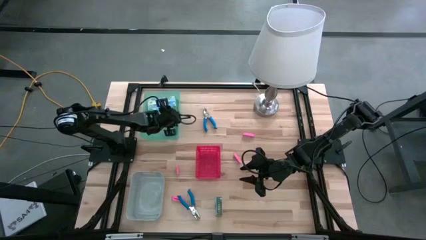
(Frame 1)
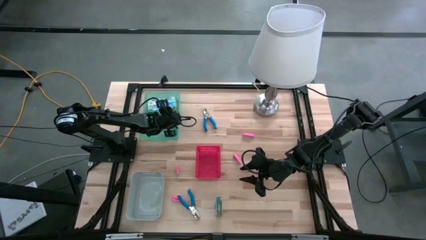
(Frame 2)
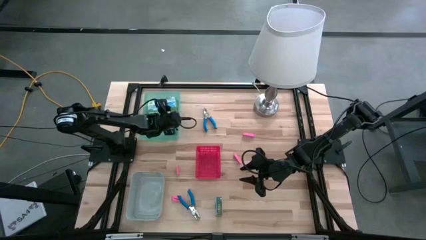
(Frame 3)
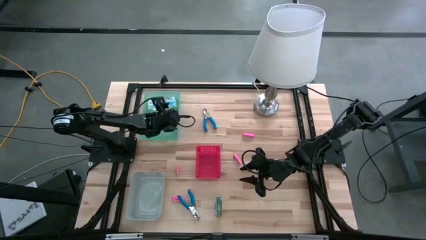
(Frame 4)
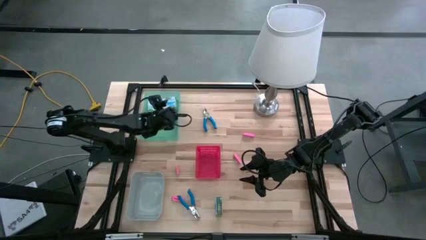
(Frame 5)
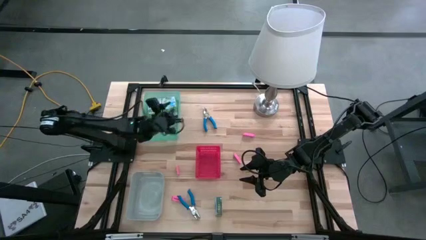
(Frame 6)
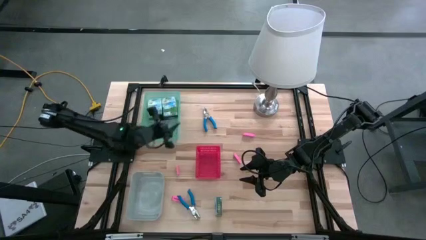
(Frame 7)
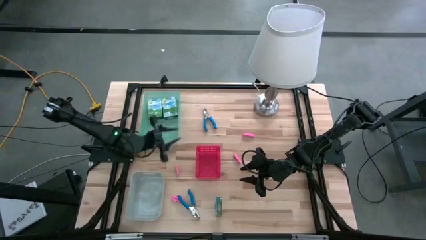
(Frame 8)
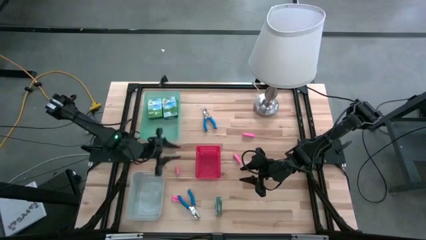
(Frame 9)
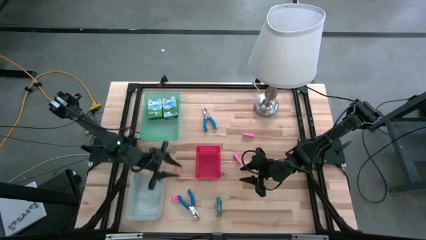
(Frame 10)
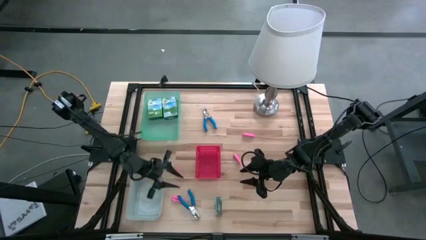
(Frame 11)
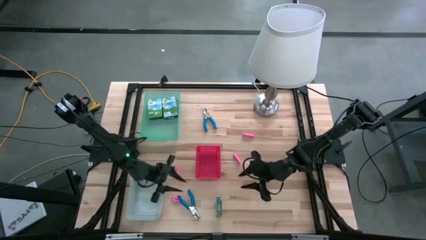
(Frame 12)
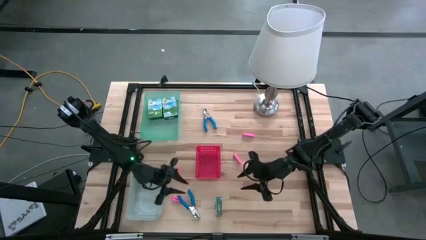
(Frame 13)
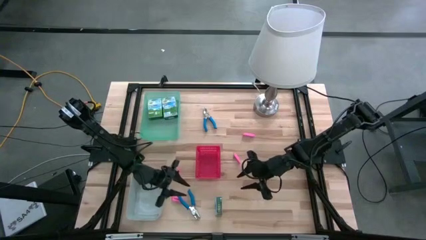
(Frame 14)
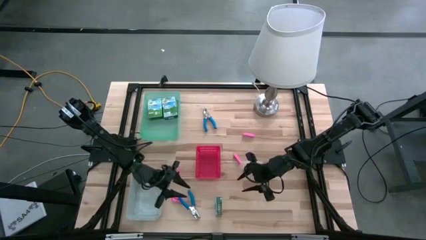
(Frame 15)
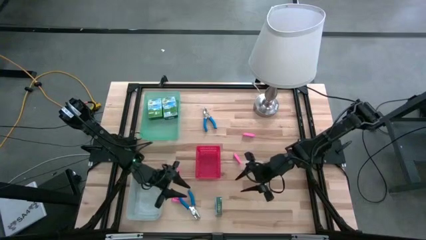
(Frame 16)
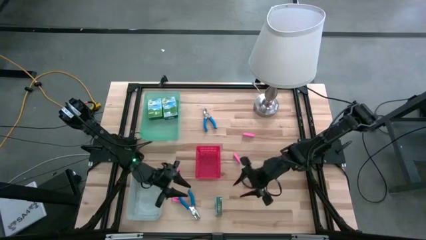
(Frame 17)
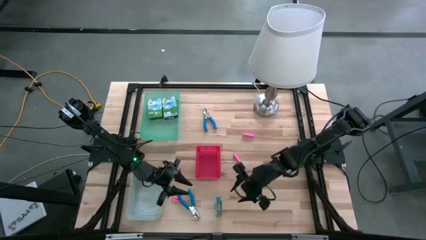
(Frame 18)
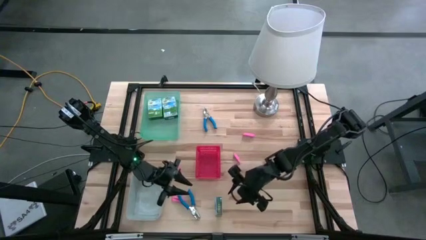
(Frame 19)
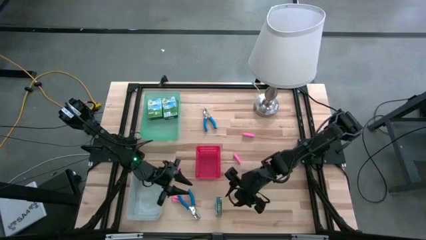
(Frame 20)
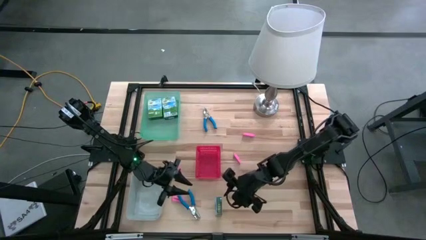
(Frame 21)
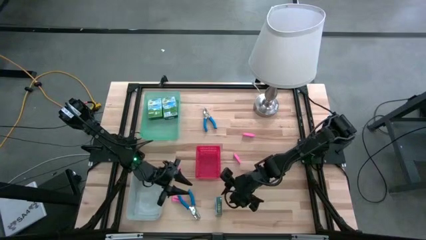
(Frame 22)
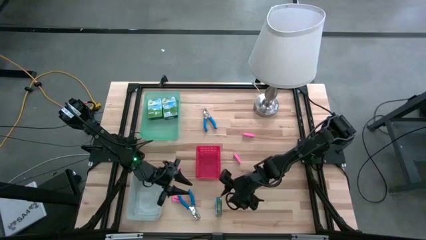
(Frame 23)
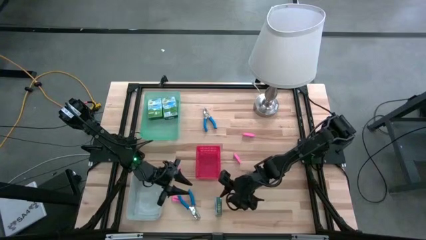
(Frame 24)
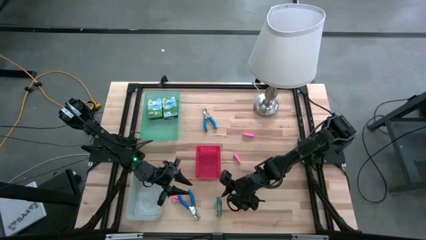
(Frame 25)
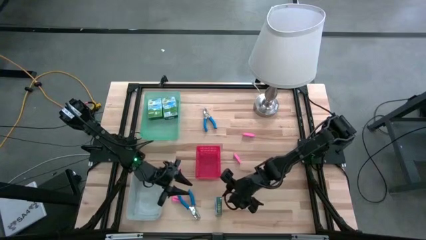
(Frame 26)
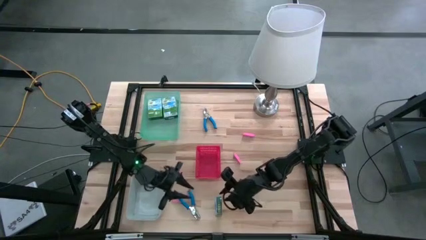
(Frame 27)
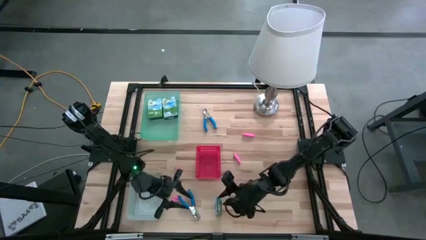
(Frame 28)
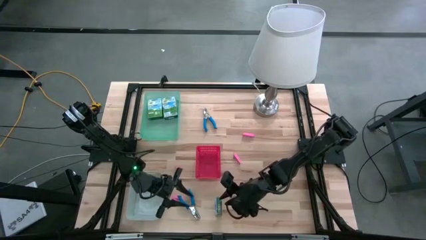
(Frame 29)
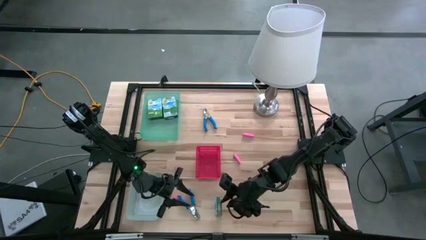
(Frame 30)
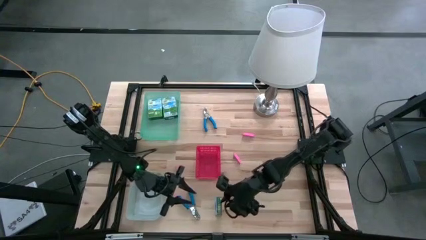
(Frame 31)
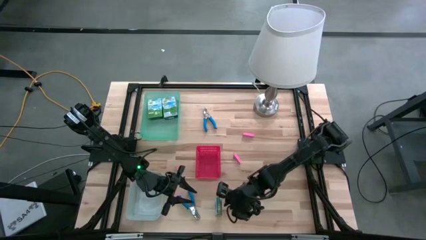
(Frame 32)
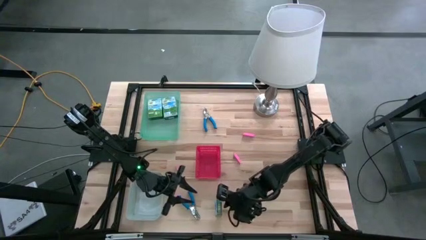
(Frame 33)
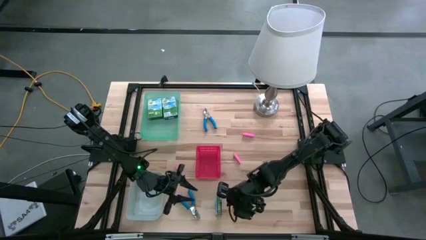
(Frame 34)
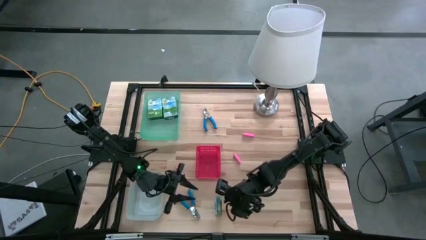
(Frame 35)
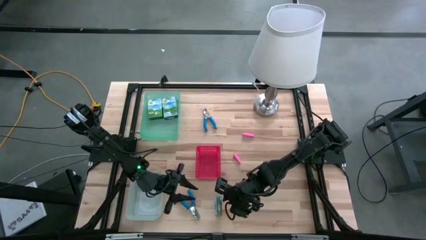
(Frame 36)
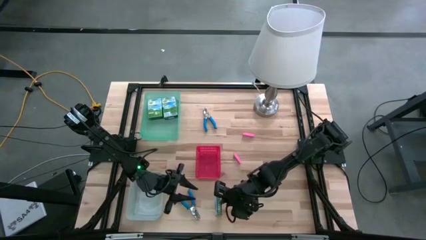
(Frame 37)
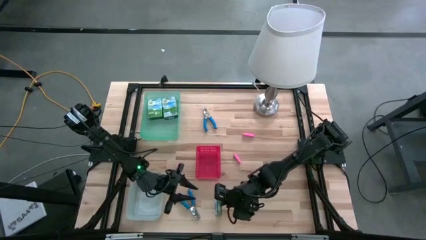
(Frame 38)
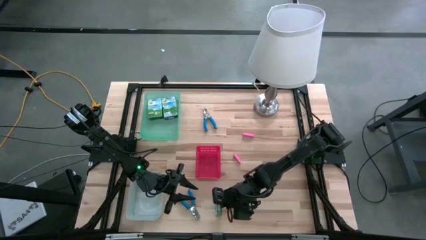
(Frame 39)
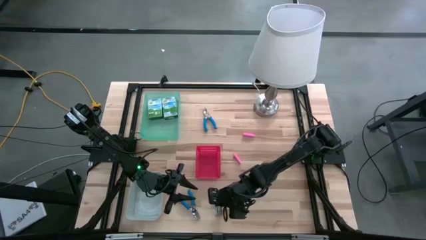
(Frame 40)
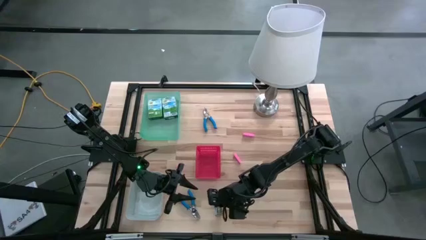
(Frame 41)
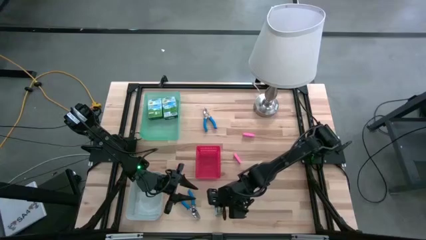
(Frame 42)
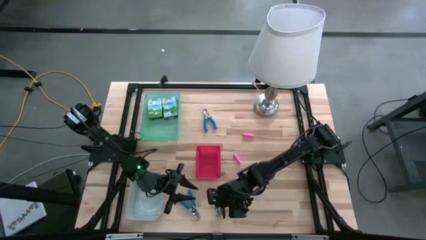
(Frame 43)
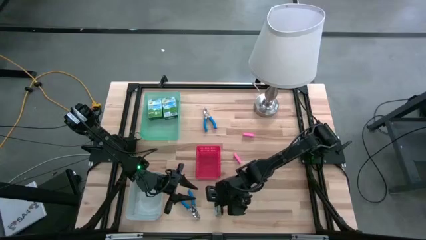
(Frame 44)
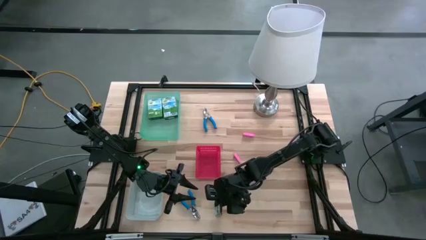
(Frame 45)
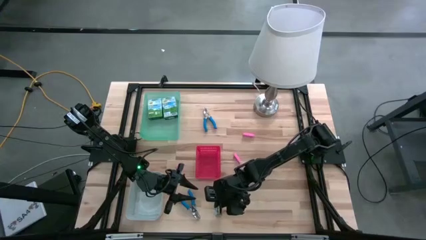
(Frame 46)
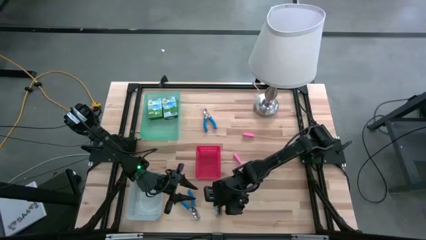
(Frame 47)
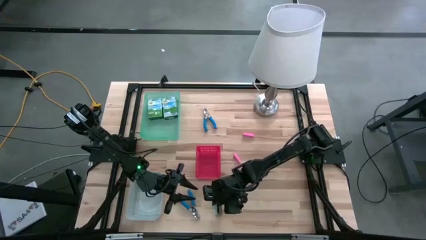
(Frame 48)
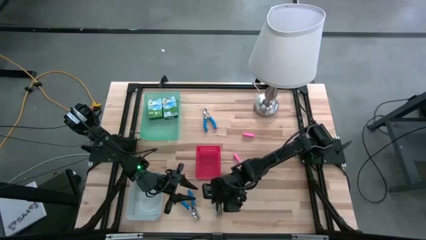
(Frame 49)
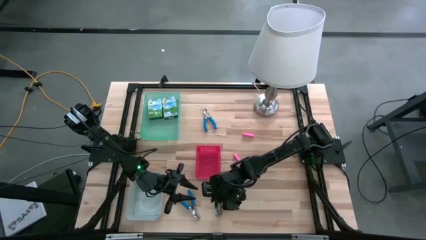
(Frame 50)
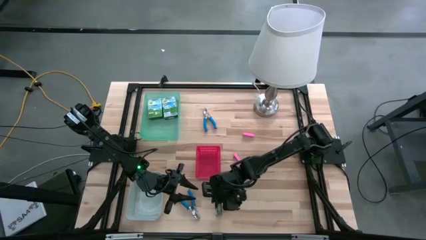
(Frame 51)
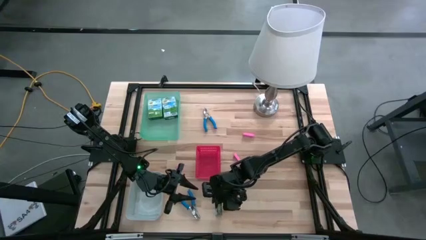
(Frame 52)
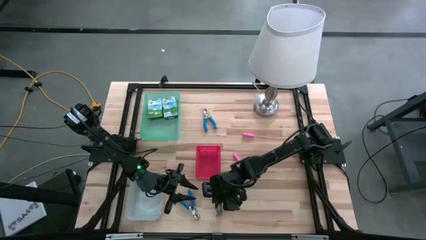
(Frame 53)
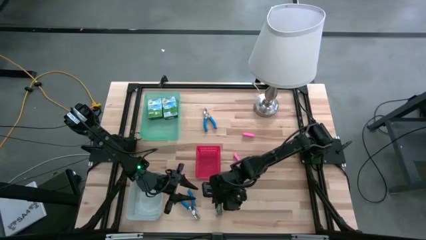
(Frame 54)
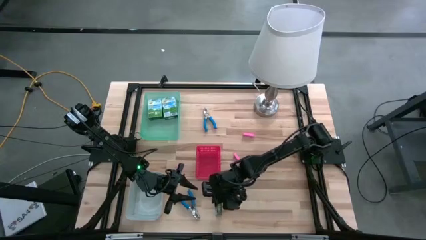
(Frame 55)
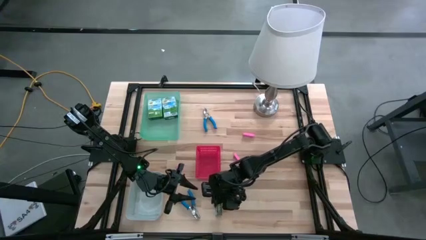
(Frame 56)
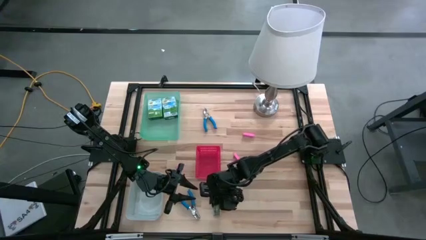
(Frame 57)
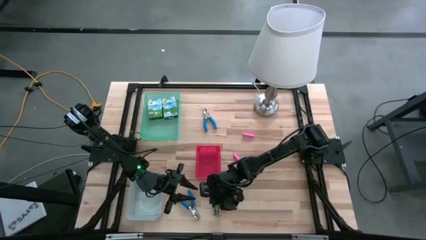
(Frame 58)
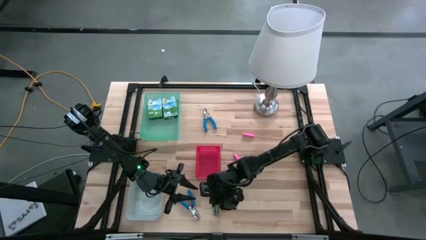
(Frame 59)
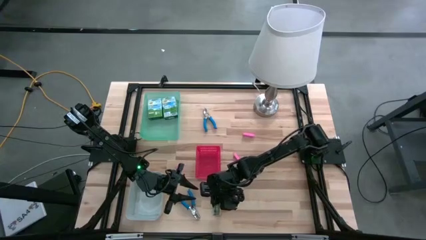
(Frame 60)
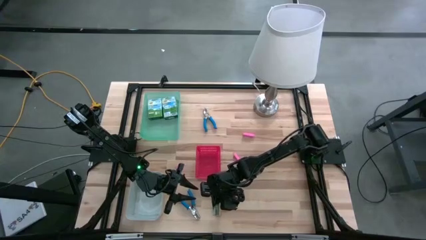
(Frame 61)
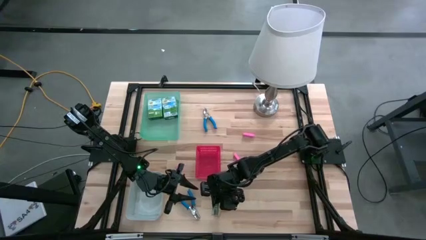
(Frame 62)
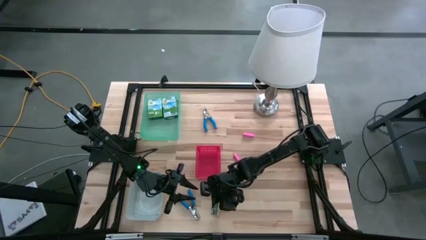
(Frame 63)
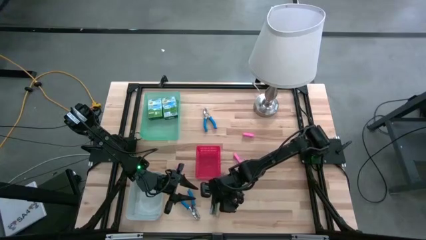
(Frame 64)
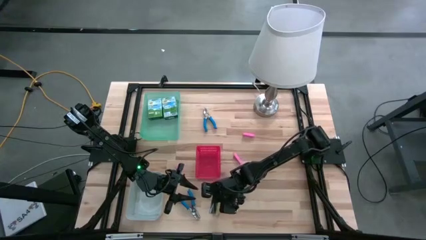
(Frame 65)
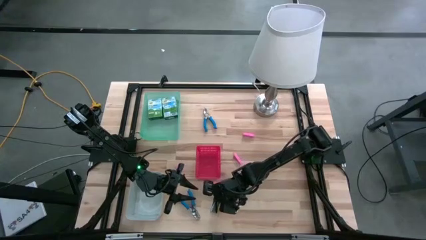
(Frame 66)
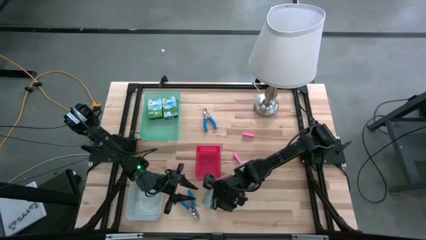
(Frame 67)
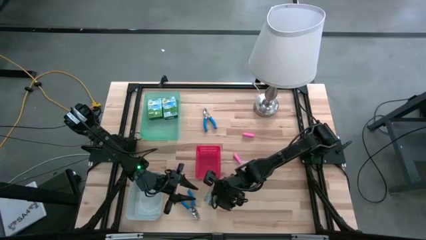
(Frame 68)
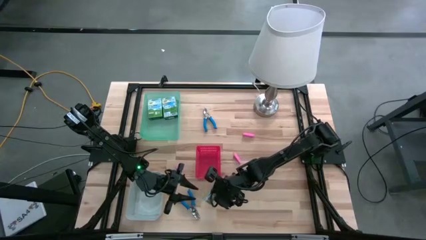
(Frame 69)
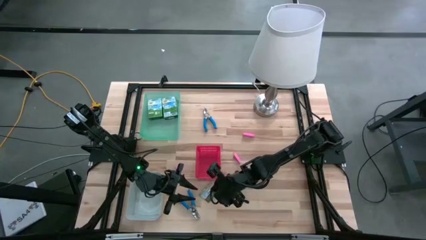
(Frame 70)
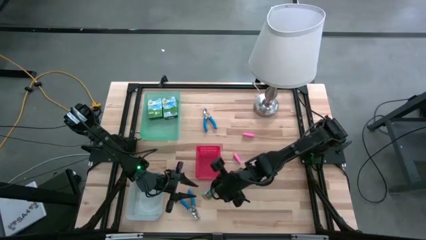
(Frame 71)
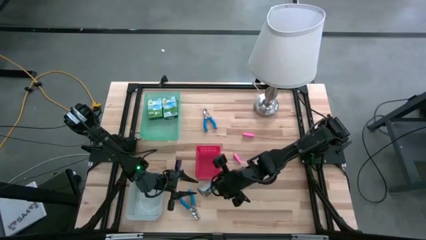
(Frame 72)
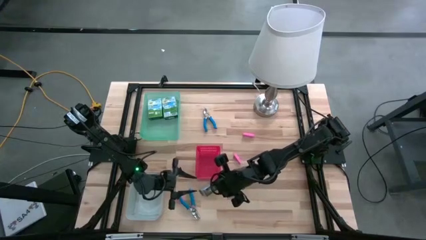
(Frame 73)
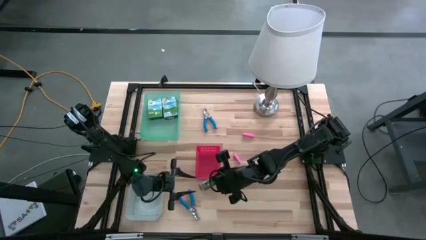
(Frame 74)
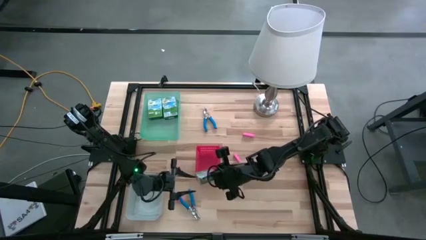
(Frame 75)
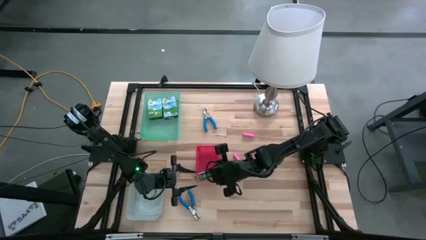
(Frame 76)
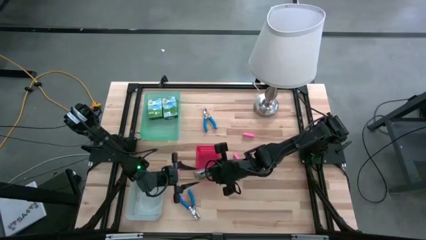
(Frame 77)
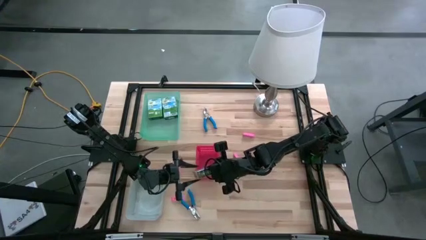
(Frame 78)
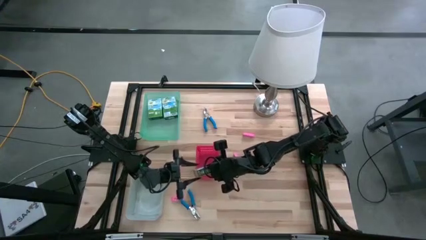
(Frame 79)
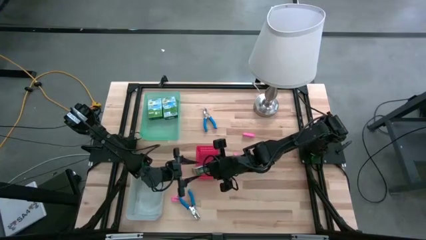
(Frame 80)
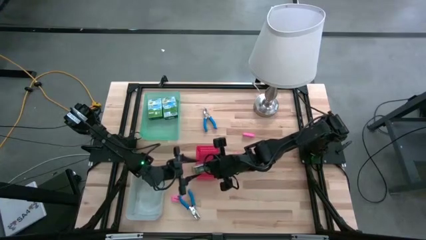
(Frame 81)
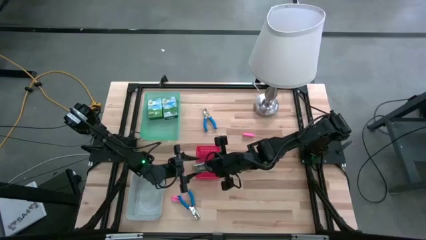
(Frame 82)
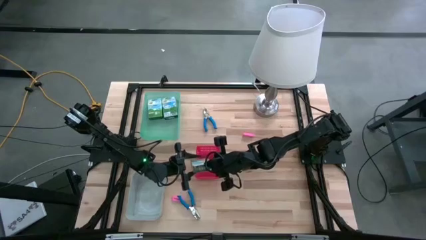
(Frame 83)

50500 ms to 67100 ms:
Task: Pick & Place School Supplies
Put the yellow crayon box into the green bin
